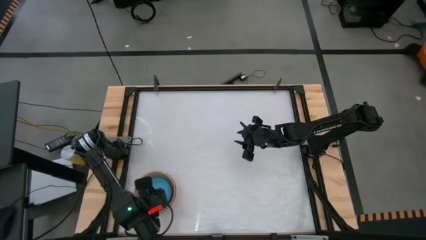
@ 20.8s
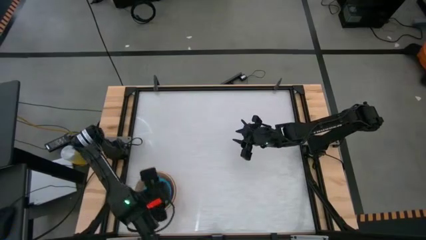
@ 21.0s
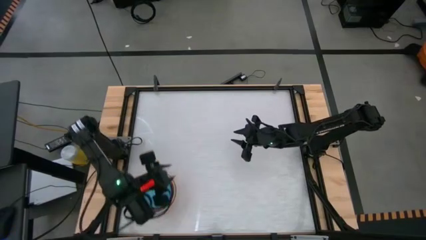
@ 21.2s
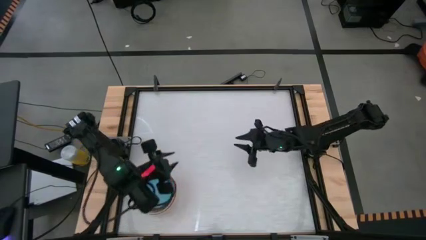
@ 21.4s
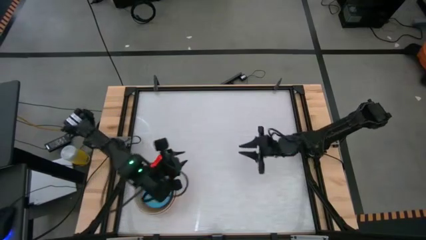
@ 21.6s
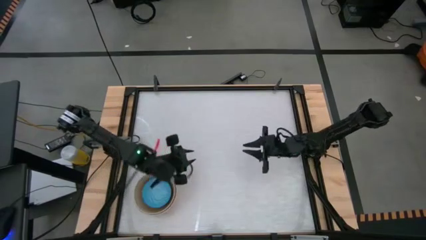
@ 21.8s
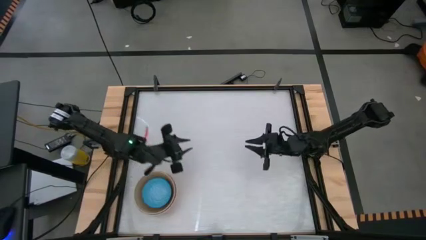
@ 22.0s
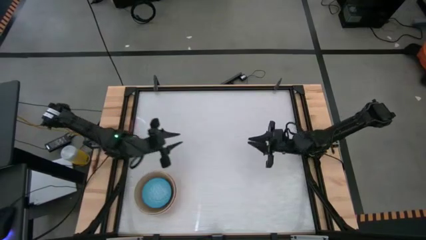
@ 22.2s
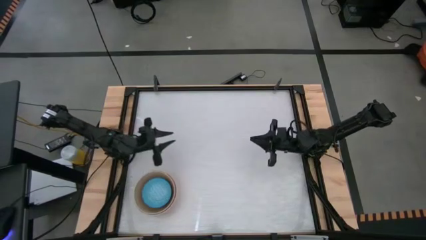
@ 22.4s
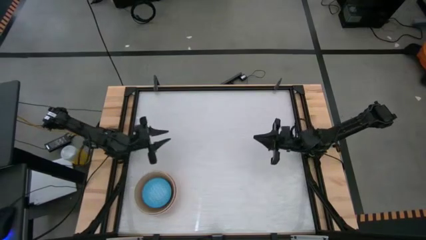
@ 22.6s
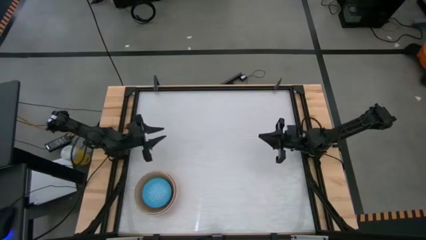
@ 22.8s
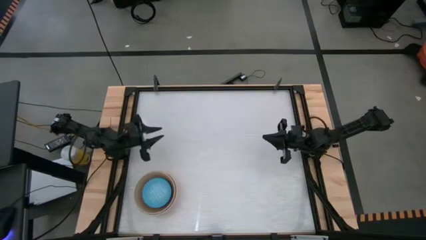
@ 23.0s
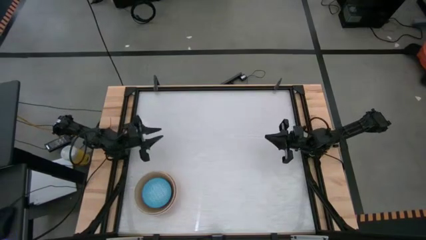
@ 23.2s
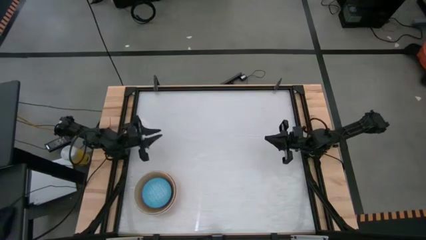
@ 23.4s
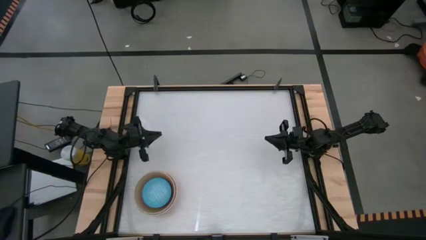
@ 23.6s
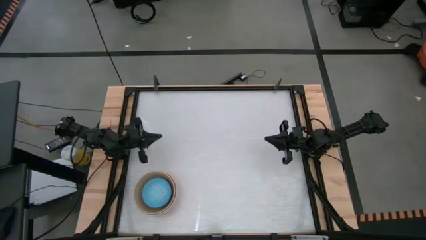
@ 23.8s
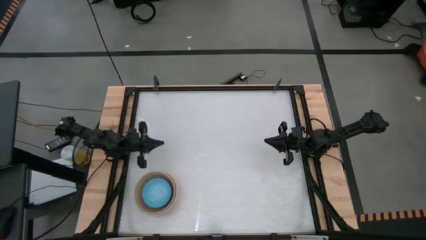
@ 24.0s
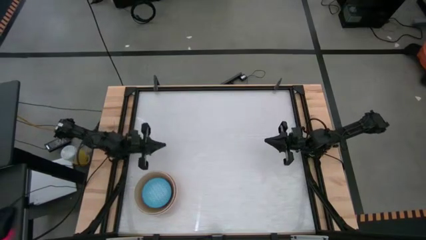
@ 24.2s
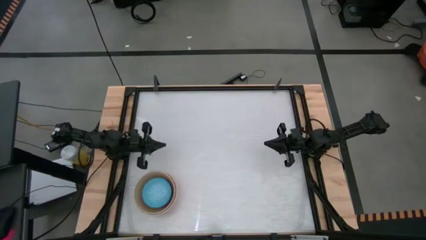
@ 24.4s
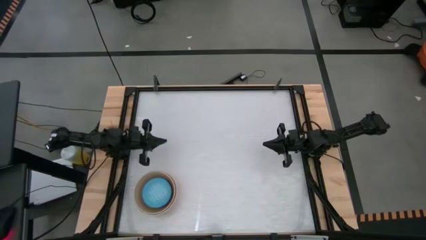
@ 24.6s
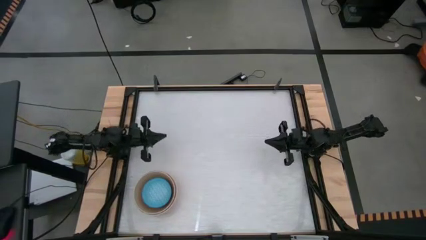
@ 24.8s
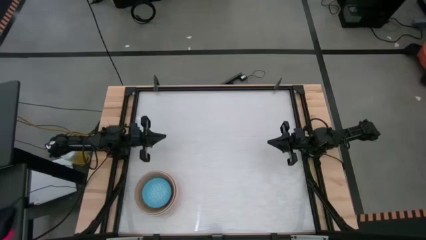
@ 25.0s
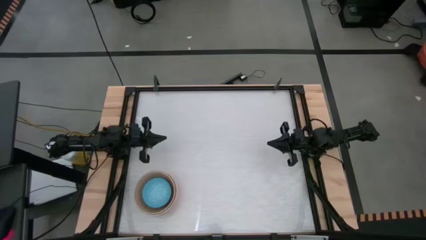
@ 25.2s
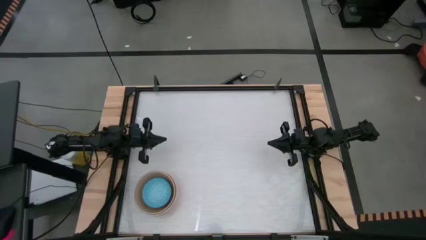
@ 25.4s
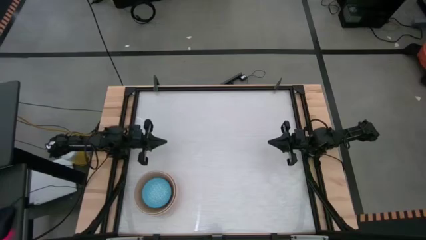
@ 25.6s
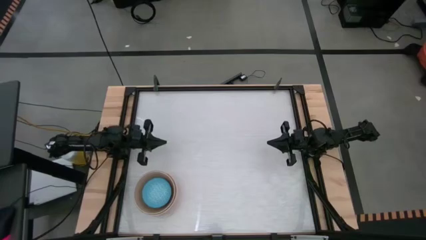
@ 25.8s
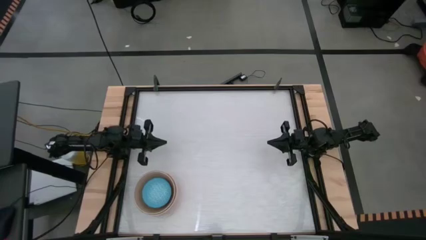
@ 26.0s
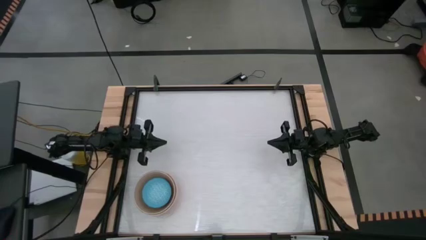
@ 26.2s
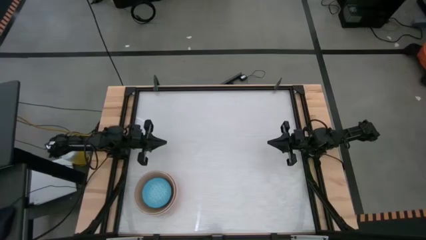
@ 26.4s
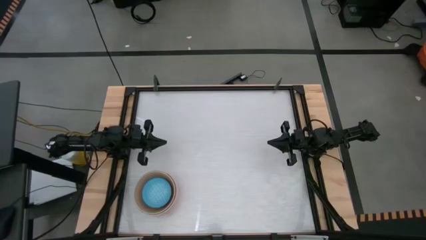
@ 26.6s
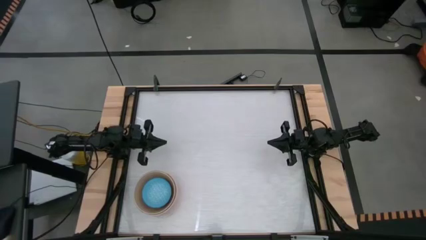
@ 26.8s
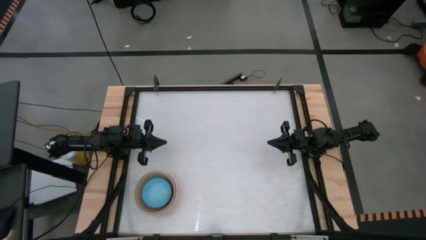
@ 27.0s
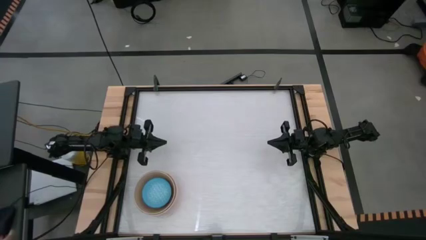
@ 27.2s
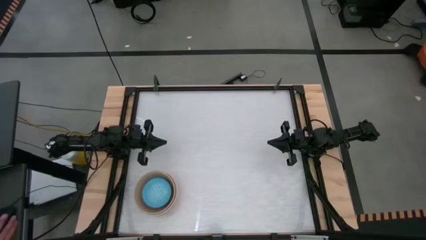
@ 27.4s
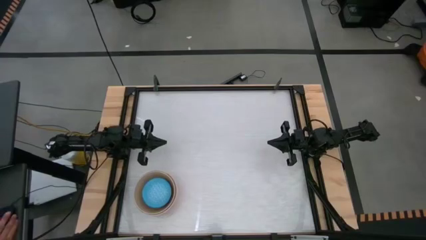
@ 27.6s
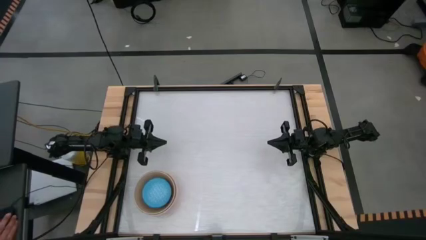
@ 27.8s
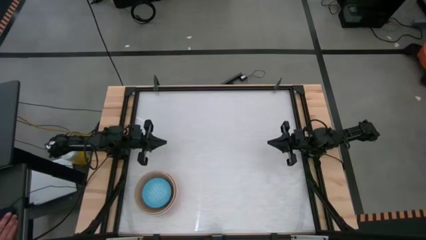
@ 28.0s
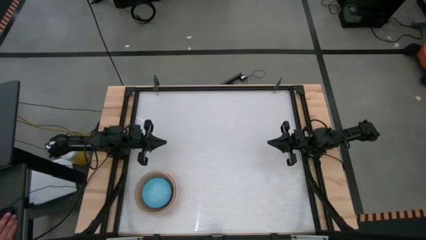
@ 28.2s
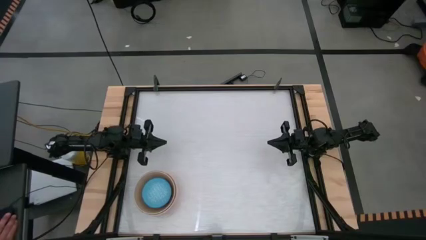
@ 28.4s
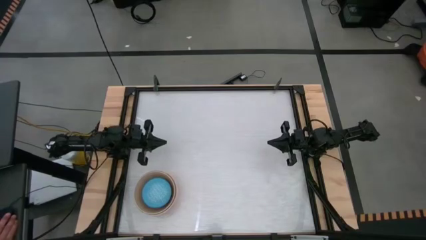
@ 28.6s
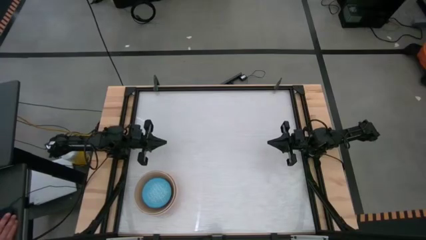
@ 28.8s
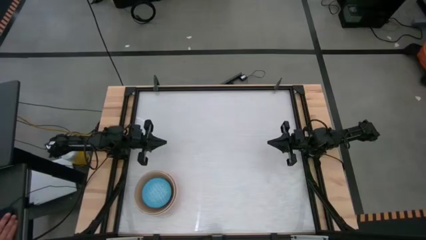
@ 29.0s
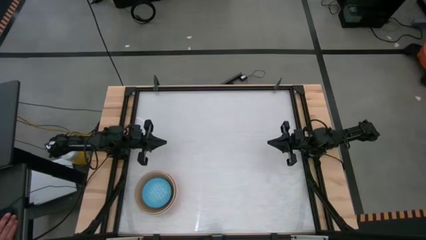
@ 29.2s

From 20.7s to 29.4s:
Return to Home Position
